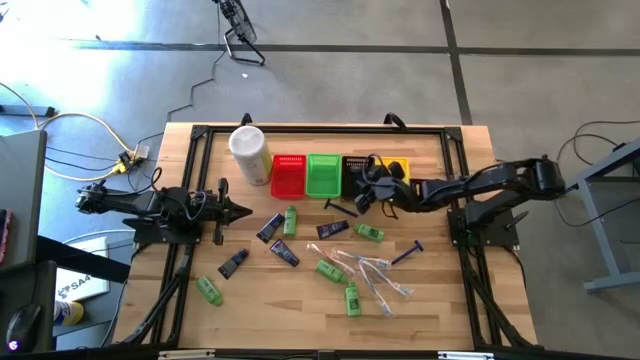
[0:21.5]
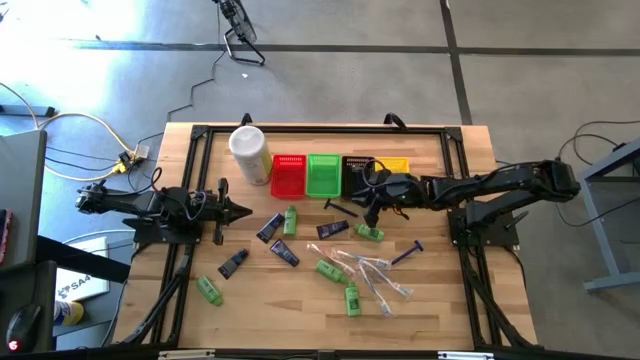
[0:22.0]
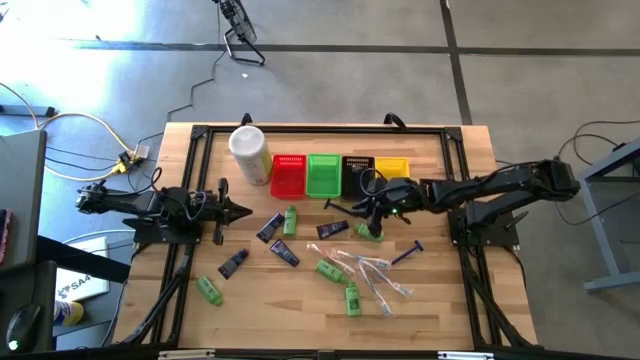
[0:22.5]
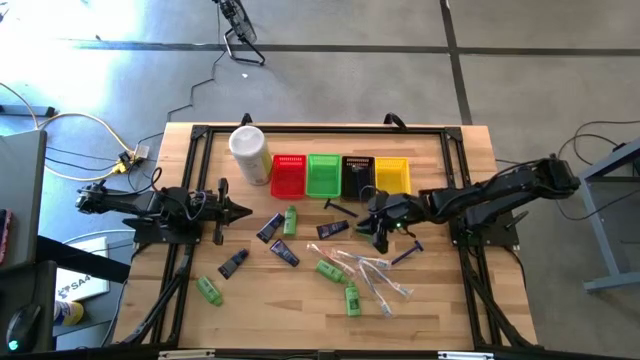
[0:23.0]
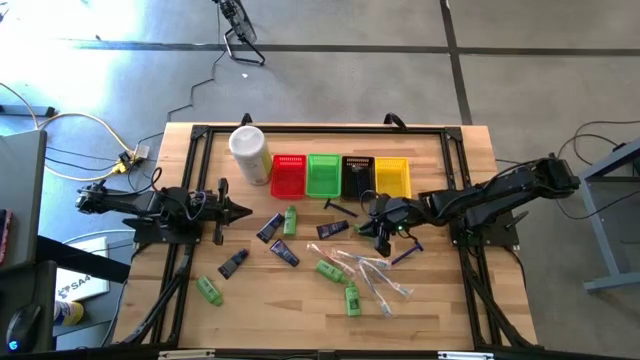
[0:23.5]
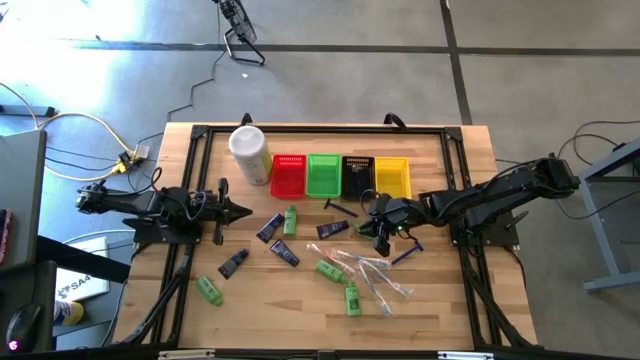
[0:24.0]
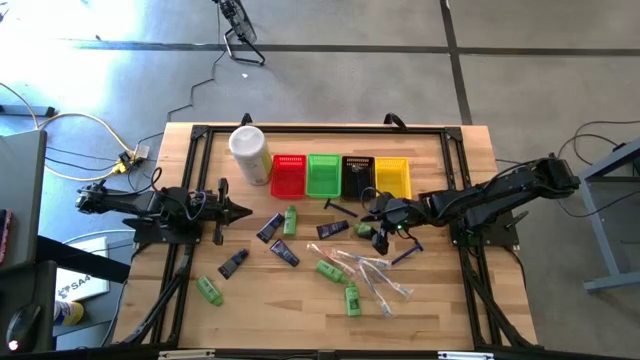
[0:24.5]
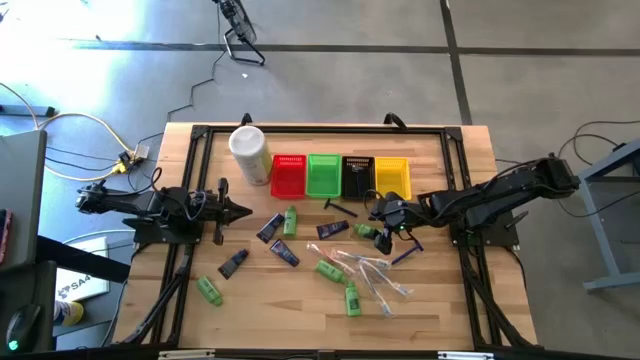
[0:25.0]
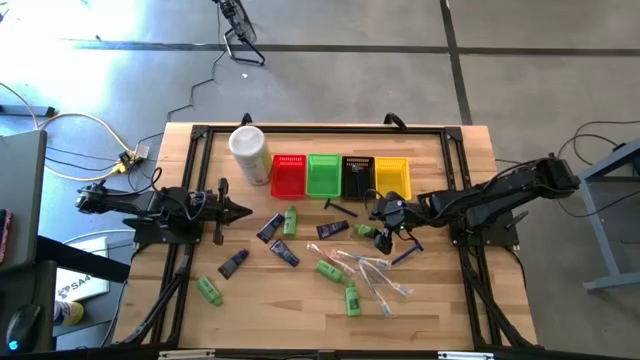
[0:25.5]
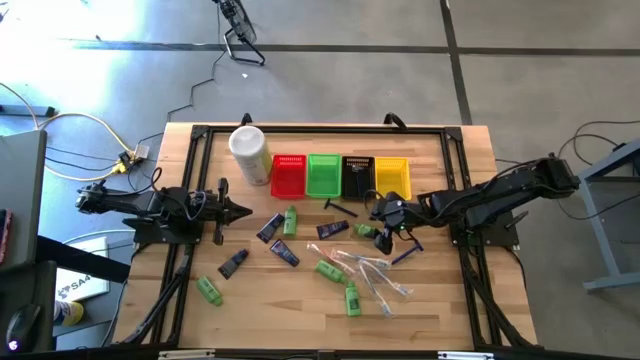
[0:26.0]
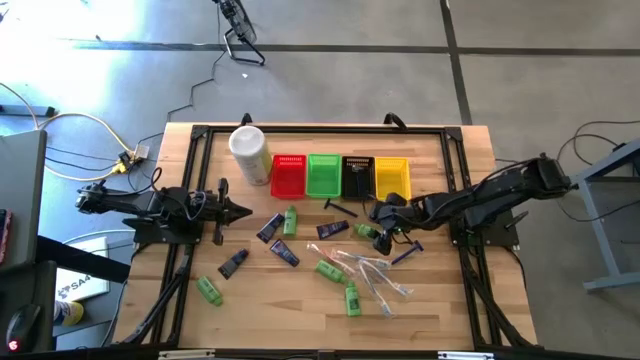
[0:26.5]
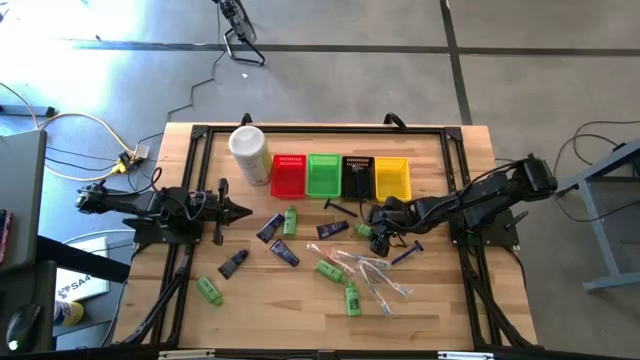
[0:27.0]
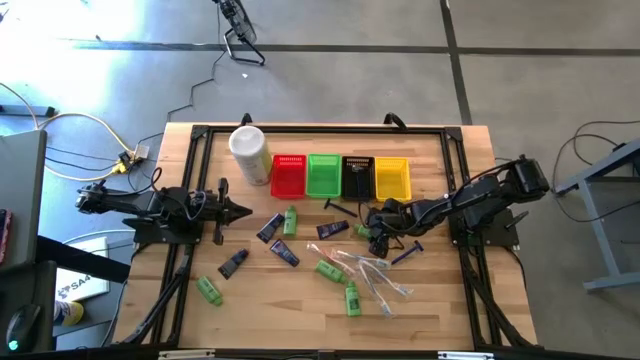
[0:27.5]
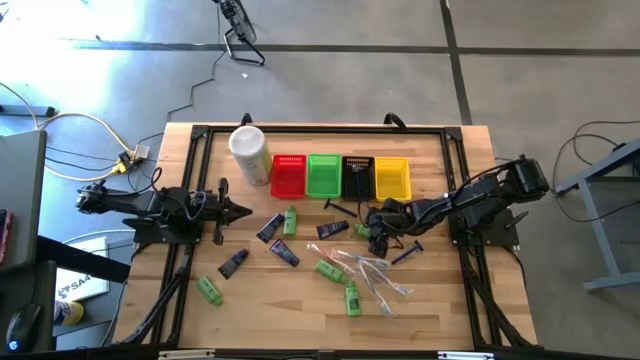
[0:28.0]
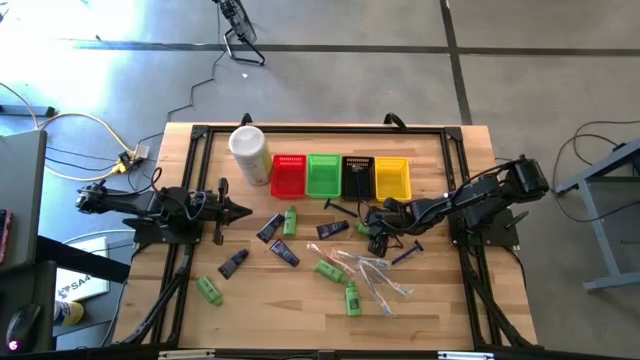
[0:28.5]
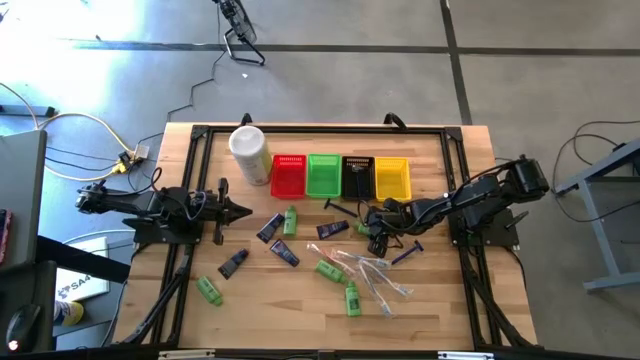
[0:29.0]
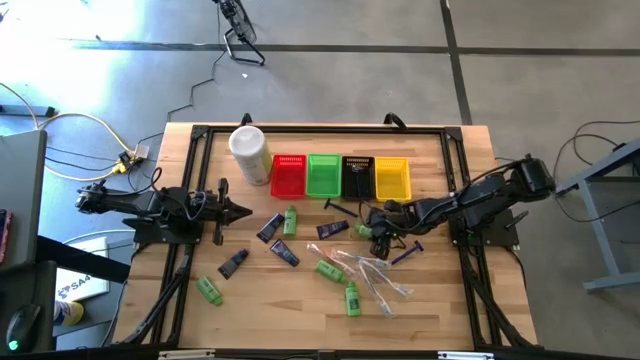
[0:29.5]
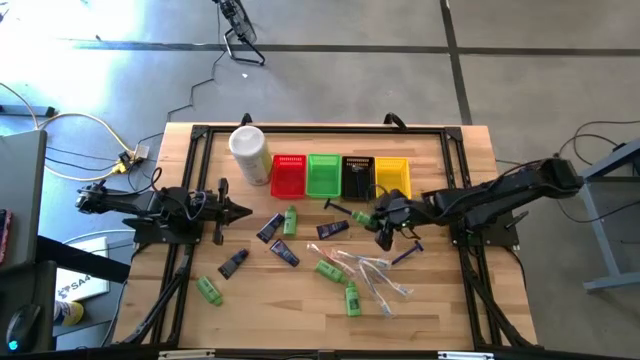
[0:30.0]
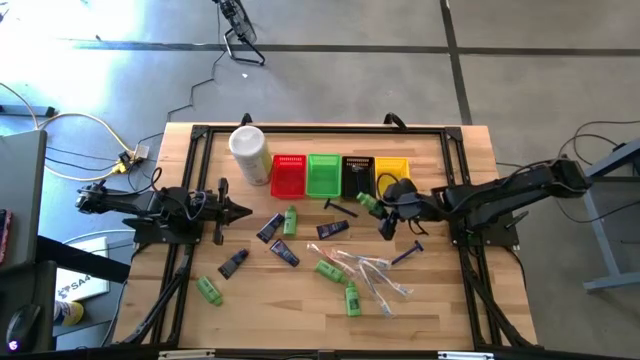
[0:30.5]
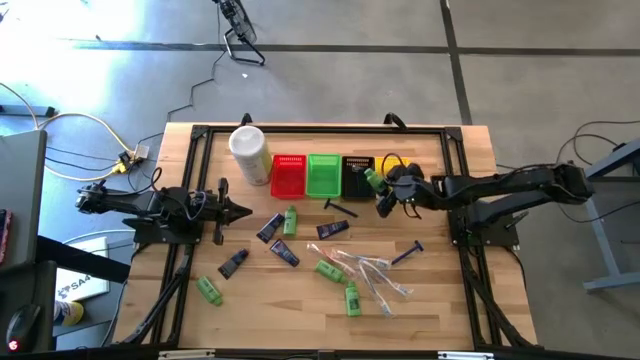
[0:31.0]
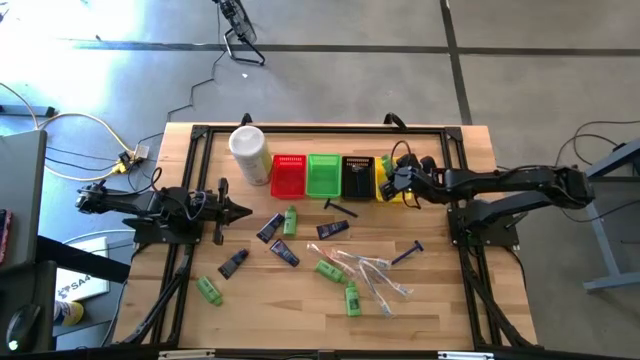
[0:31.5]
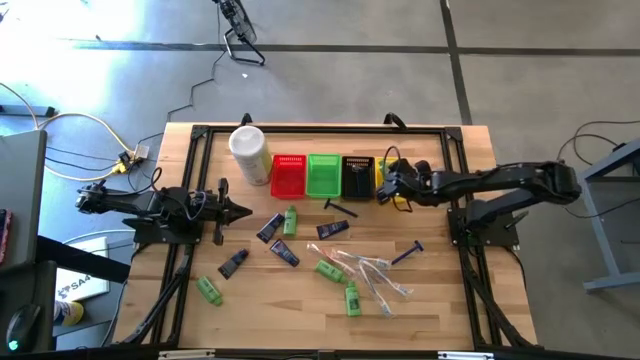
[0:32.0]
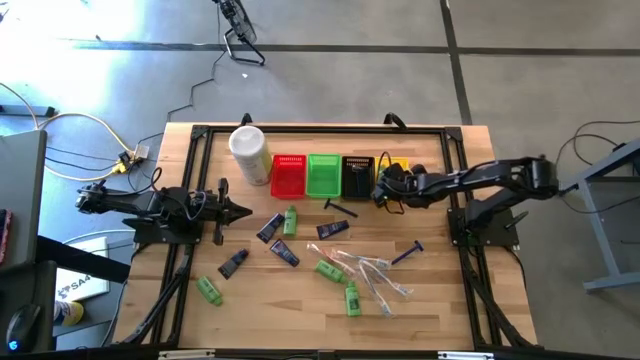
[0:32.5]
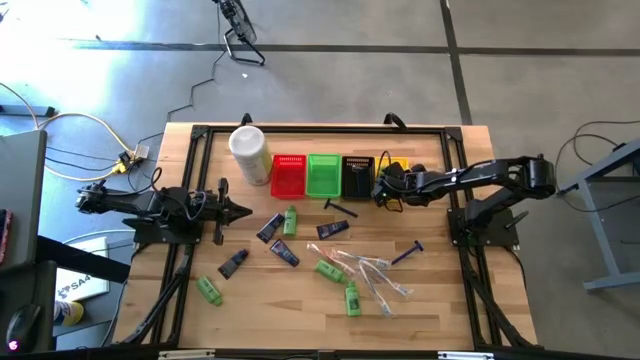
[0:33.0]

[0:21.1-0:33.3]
Task: Pick & Place Travel size toiletries
Put the green shampoo into the yellow bin

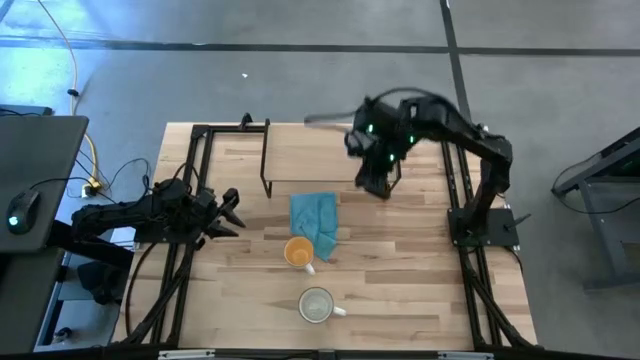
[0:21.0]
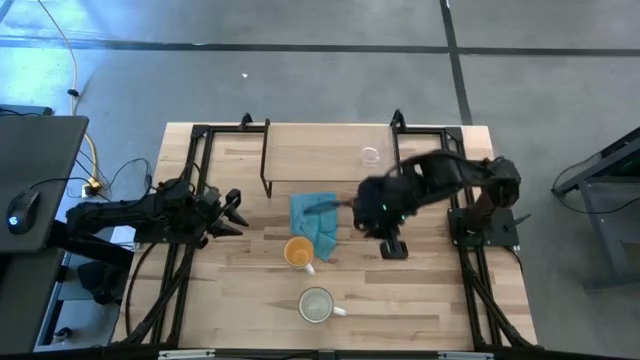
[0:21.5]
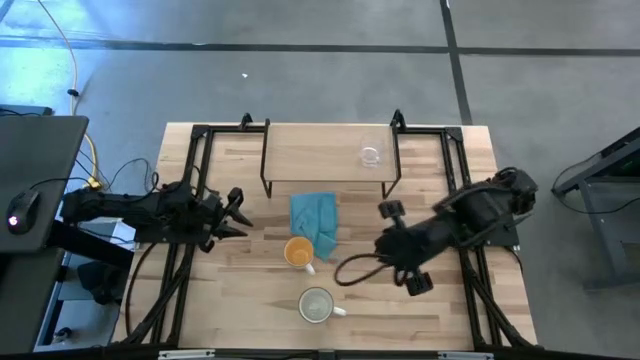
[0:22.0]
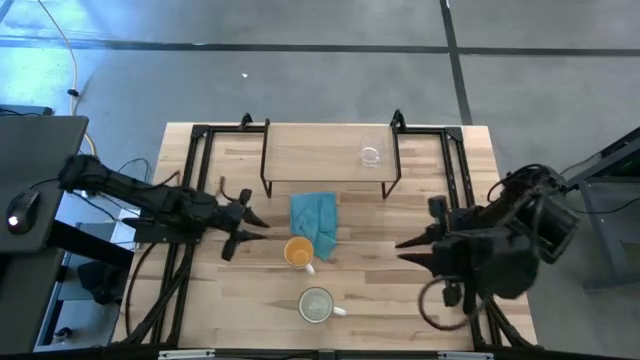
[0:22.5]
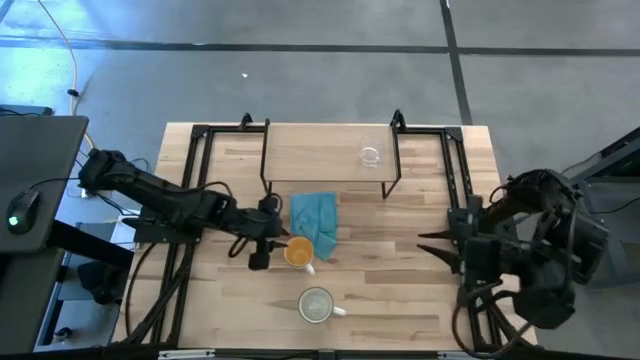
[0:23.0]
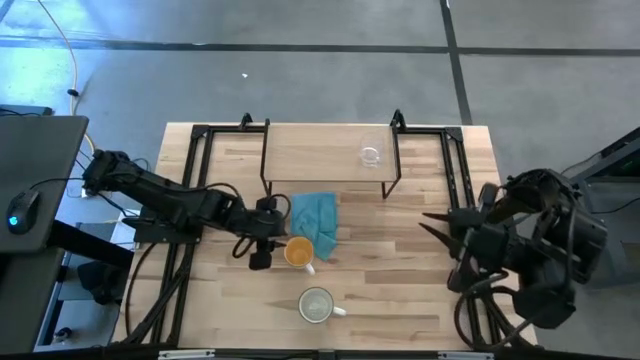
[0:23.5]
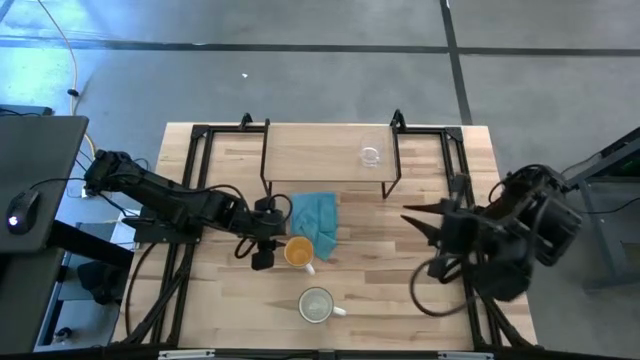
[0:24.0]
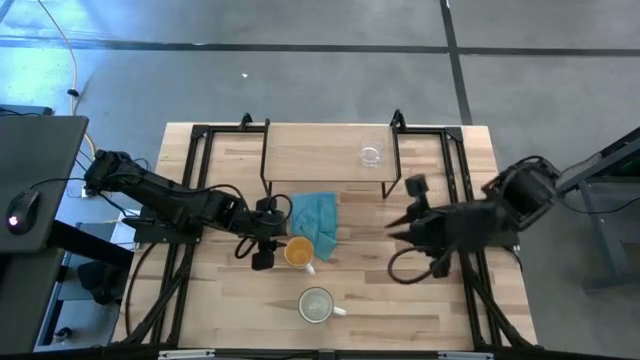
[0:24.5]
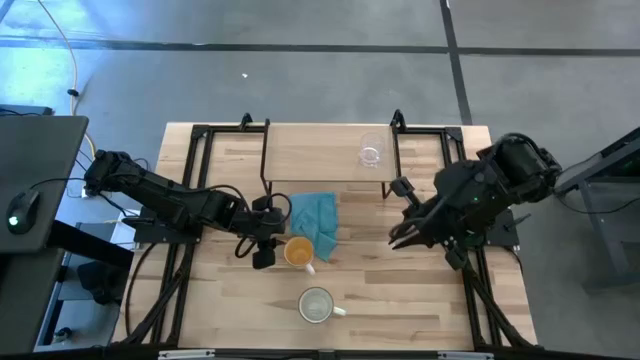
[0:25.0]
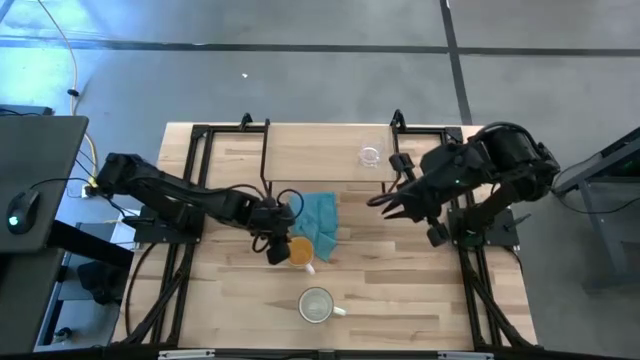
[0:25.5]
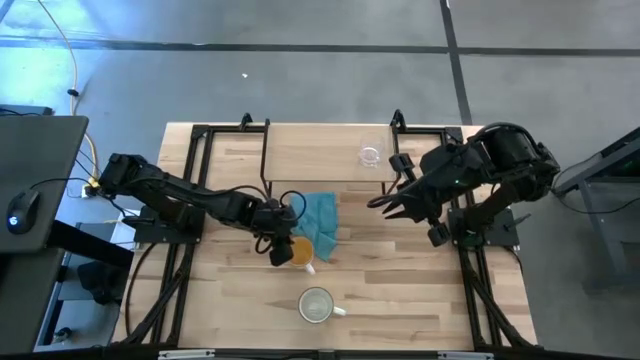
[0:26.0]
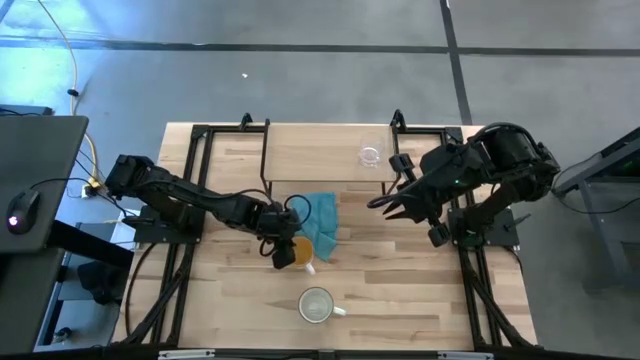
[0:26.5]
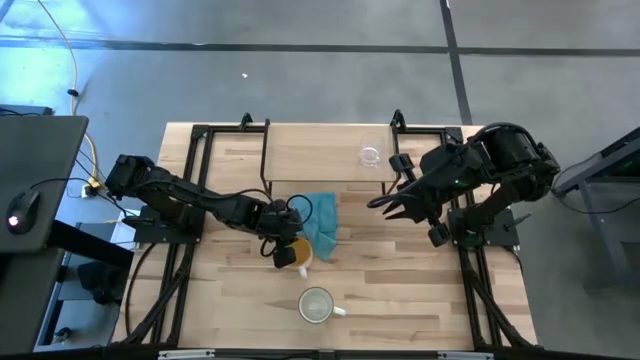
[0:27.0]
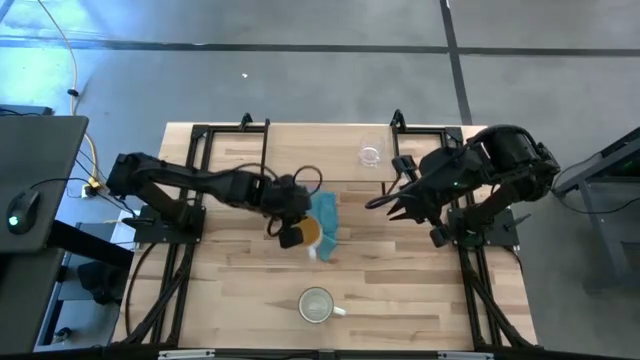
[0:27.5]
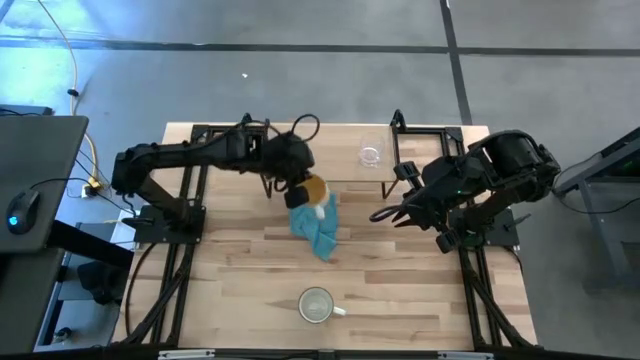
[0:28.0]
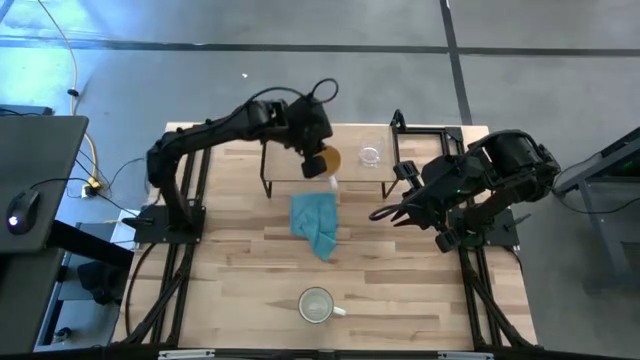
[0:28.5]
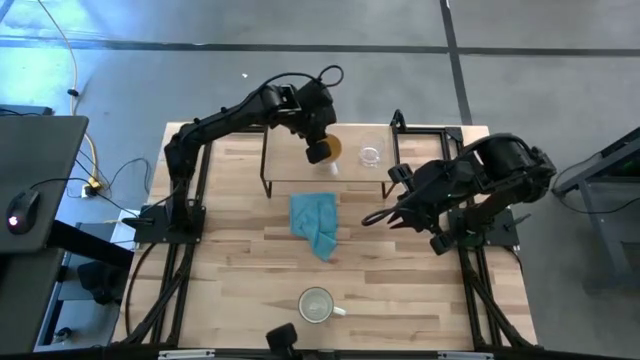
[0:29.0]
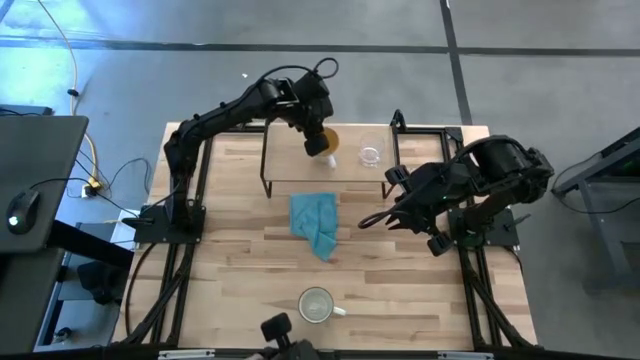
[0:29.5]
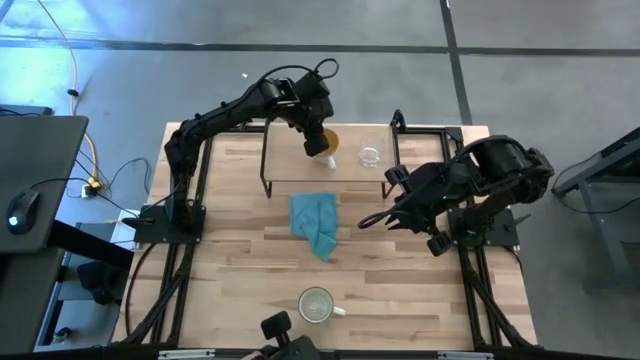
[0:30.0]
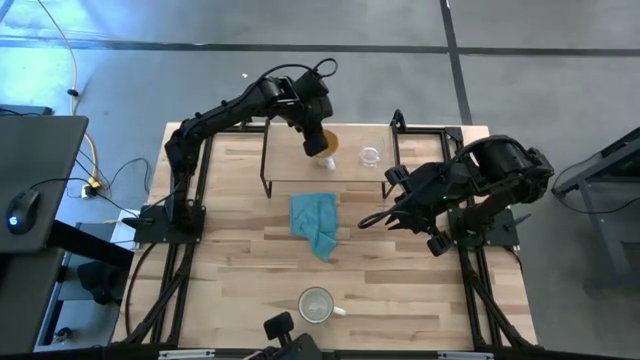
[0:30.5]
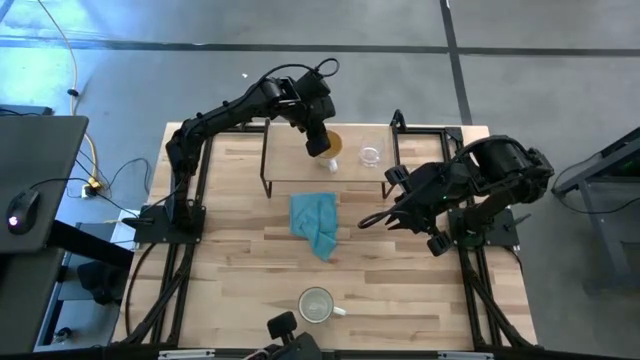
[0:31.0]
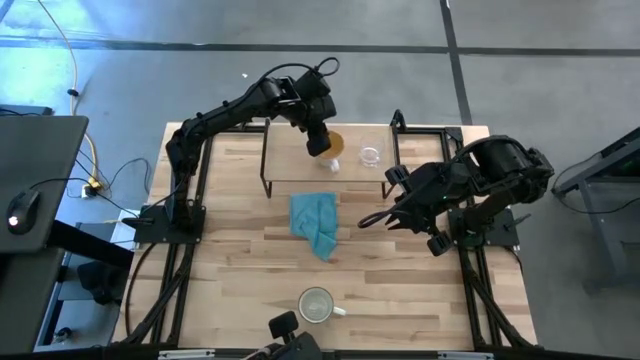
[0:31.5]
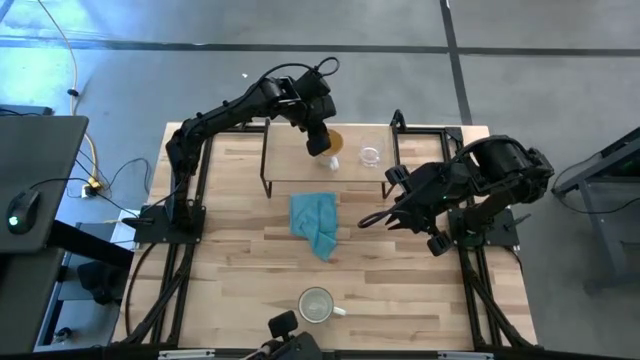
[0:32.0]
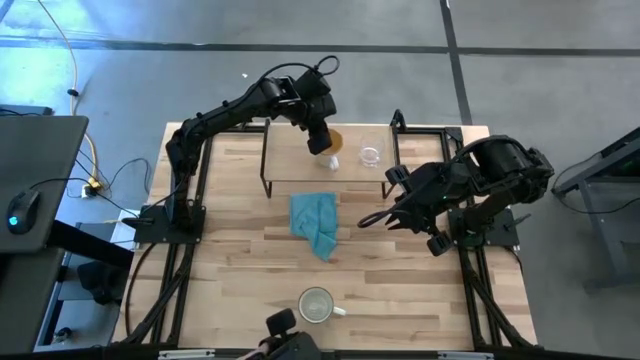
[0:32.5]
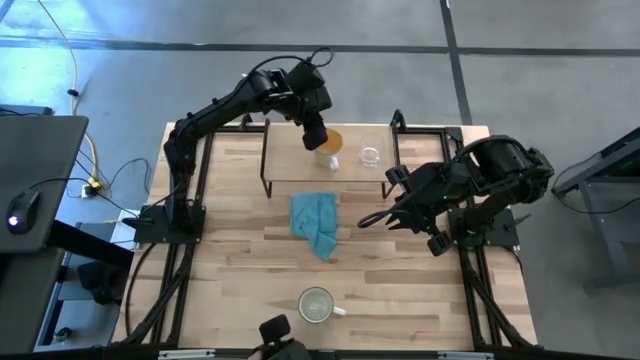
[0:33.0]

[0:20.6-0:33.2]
Task: Stack small to large cups/mugs on shelf
Put the light yellow mug on the shelf
